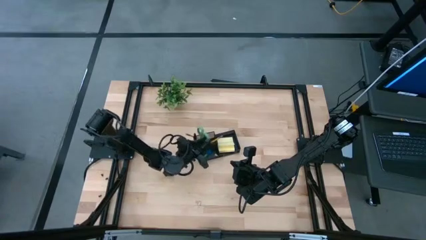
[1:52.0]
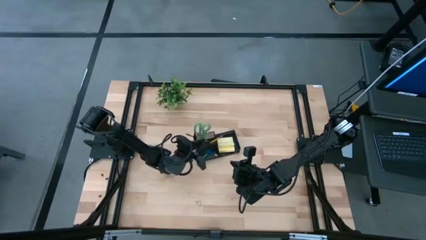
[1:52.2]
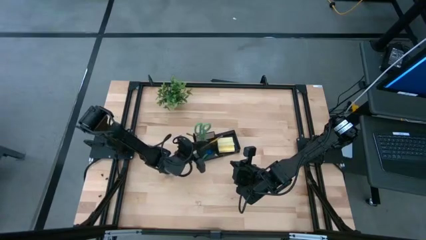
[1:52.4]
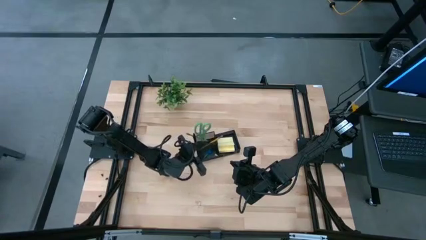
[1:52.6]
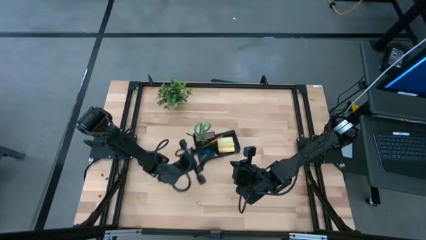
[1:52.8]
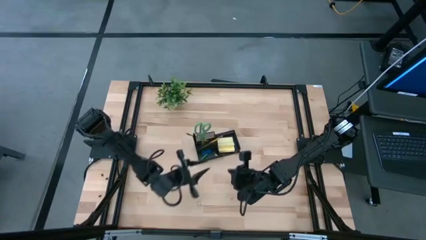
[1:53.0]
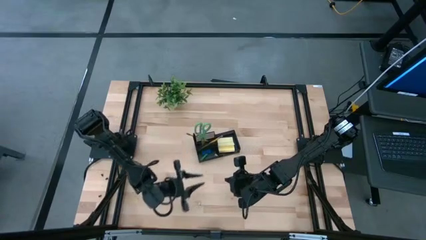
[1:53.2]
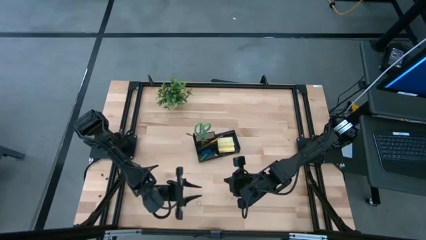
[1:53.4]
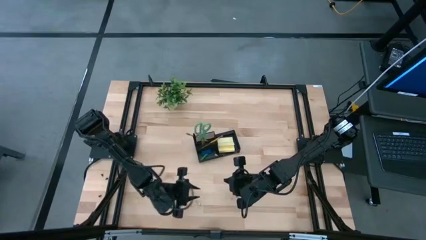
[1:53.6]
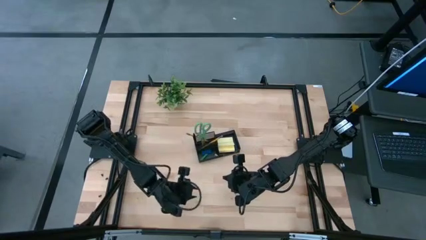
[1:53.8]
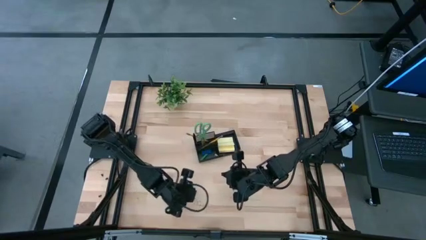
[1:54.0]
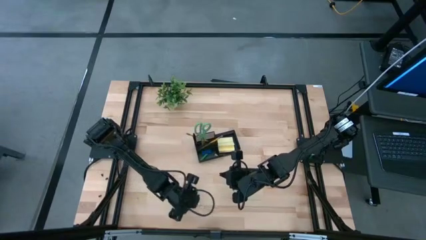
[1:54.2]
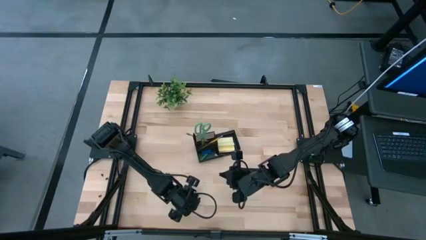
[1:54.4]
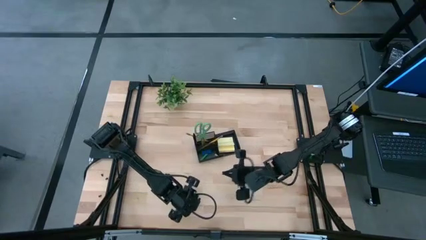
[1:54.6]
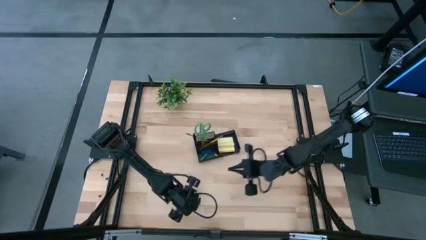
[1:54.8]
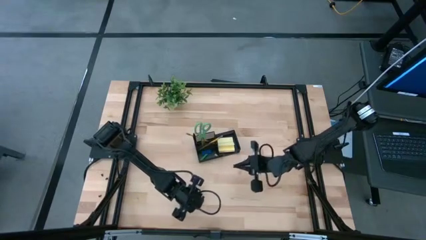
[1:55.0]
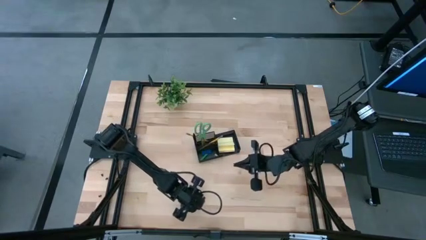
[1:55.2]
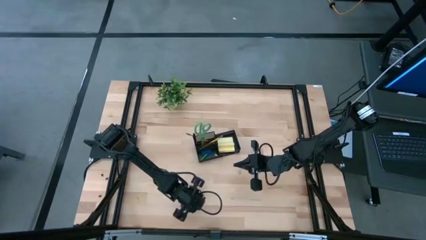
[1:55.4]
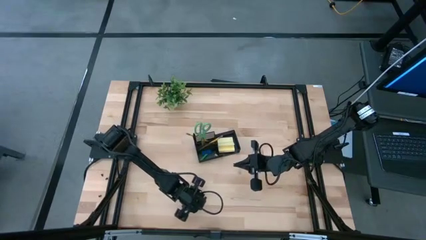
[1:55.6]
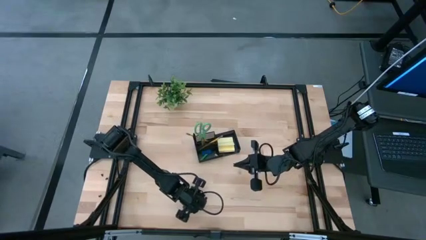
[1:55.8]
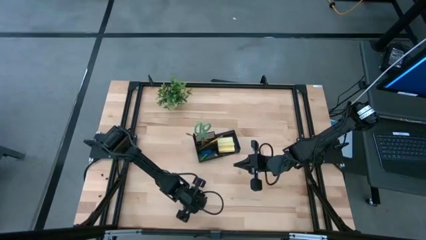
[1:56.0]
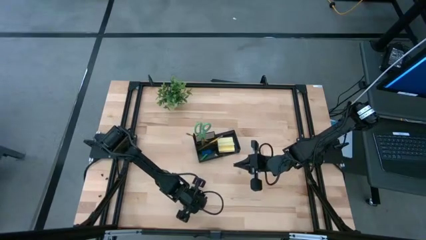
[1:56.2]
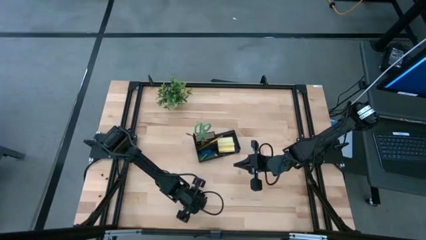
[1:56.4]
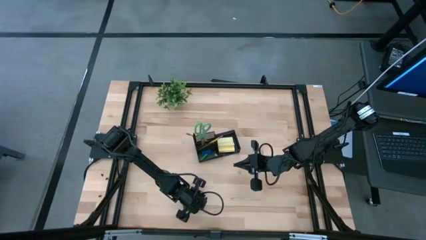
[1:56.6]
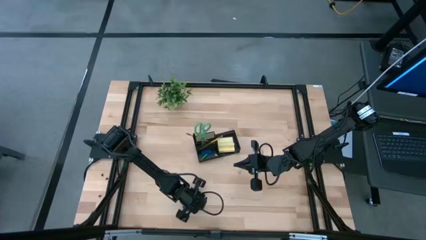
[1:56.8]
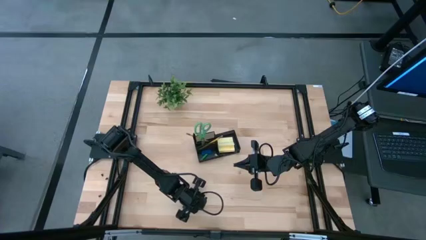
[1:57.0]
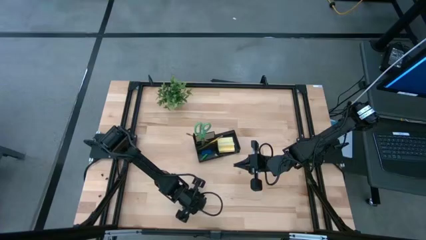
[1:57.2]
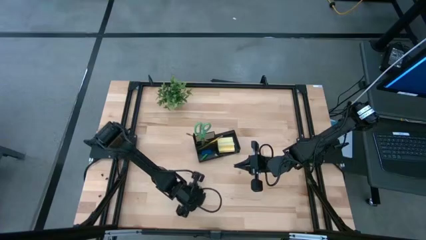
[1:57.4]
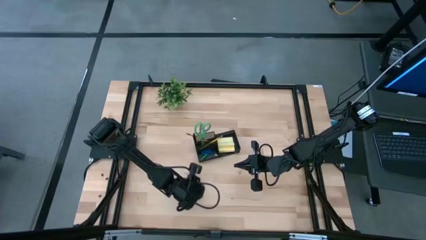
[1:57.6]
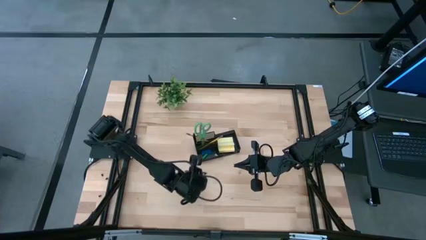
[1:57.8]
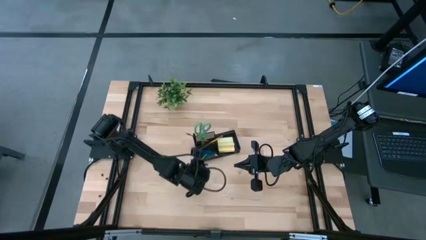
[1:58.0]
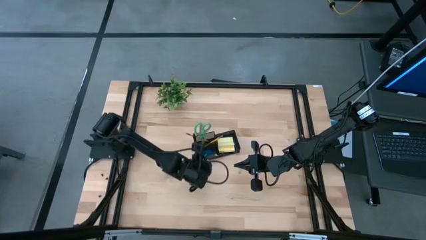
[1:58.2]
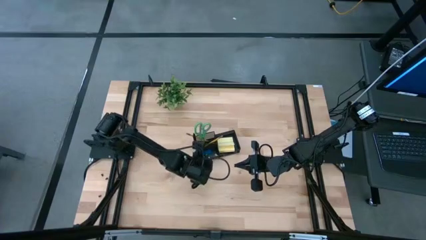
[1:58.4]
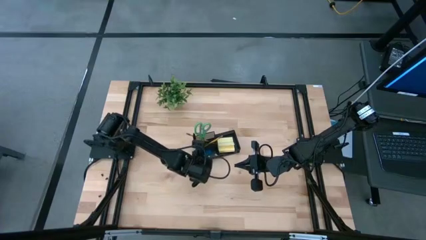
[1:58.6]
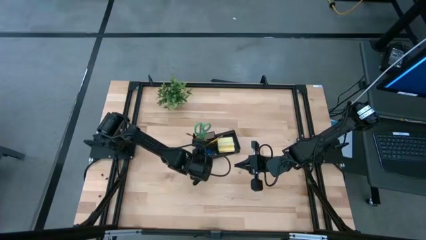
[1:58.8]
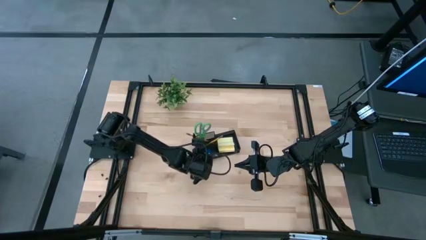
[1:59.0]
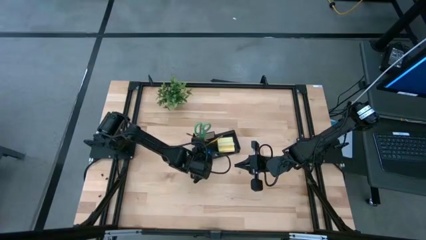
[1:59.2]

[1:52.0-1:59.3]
Task: Pick and place office supplies into organizer
Put the top yellow binder clip into the black desk organizer

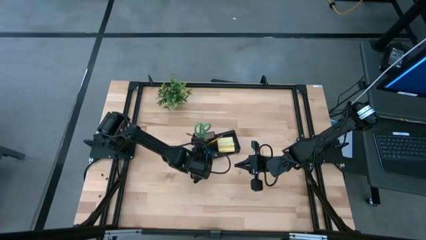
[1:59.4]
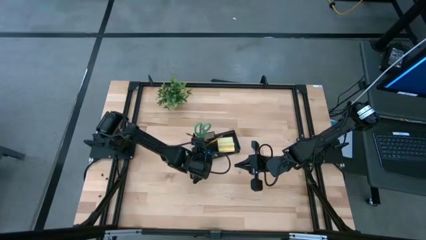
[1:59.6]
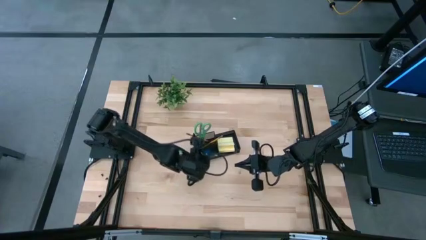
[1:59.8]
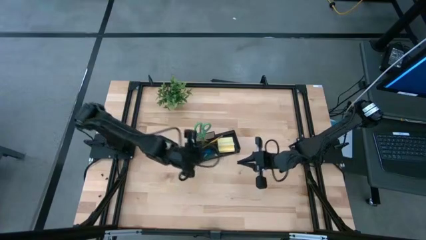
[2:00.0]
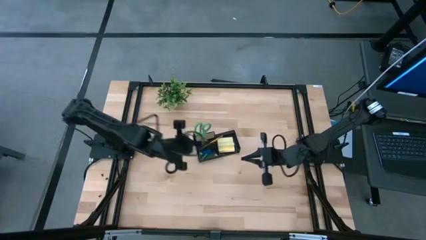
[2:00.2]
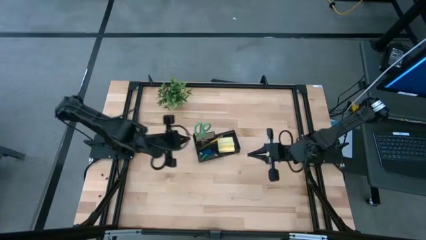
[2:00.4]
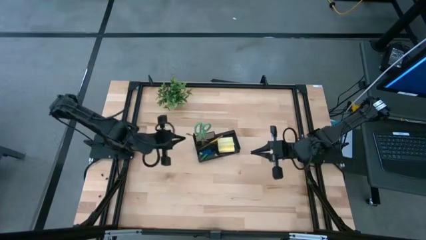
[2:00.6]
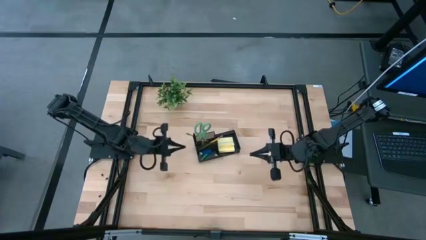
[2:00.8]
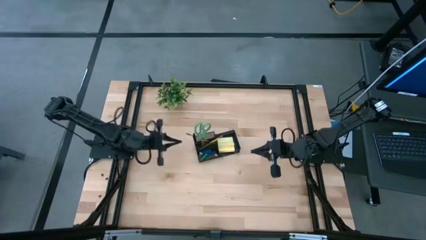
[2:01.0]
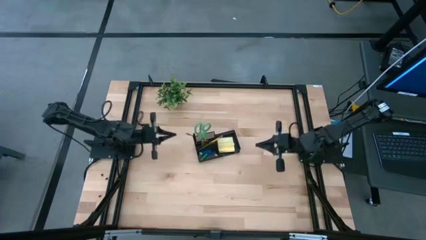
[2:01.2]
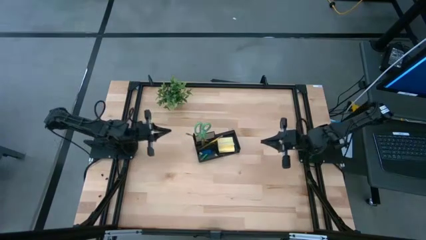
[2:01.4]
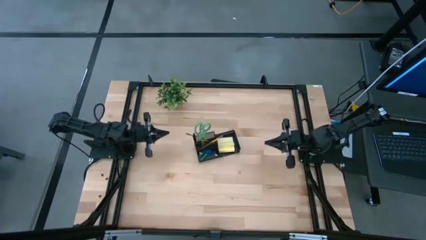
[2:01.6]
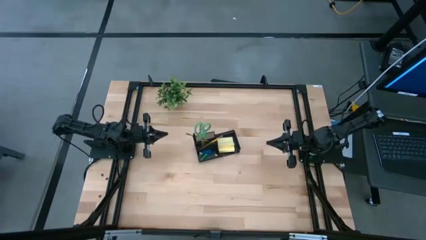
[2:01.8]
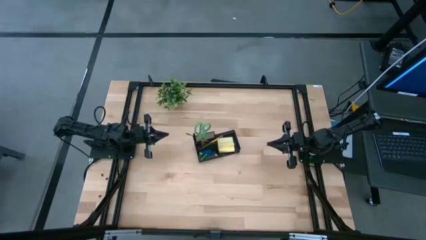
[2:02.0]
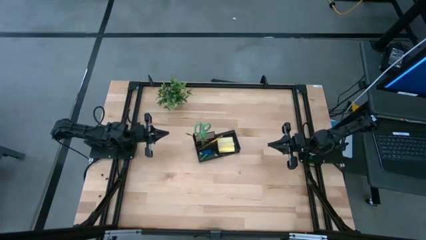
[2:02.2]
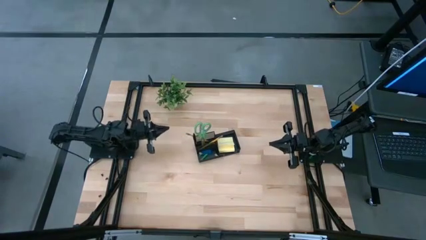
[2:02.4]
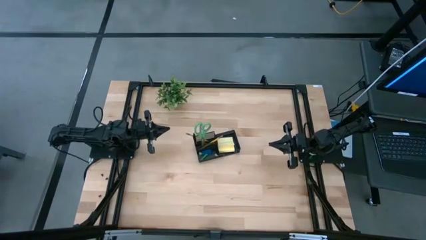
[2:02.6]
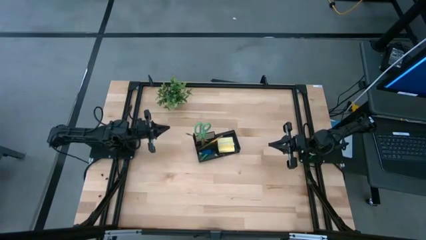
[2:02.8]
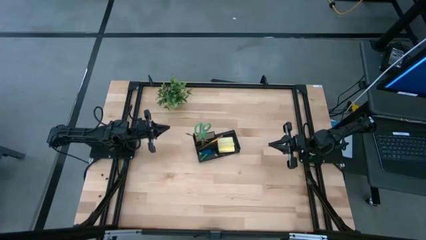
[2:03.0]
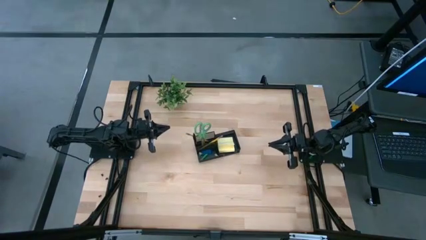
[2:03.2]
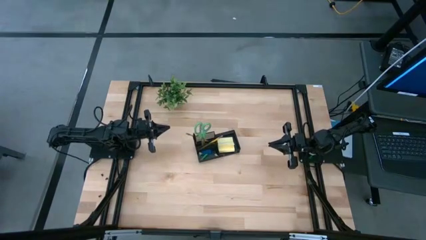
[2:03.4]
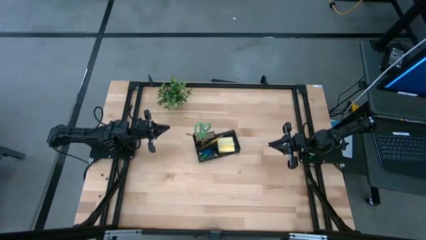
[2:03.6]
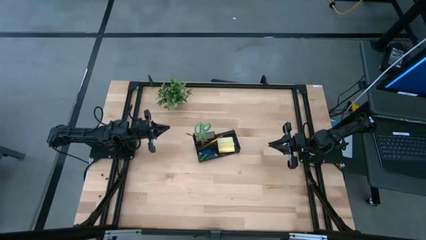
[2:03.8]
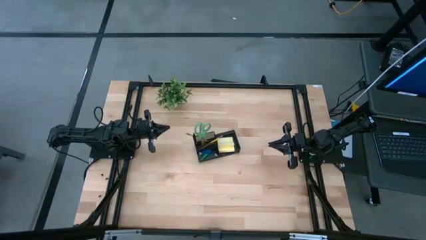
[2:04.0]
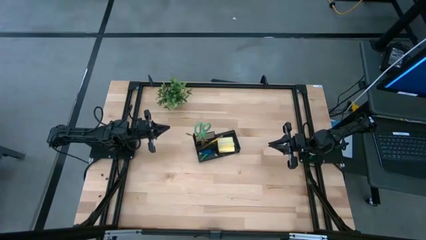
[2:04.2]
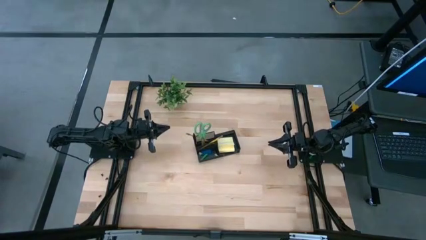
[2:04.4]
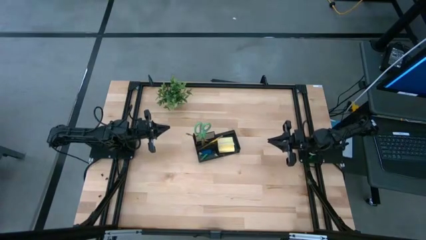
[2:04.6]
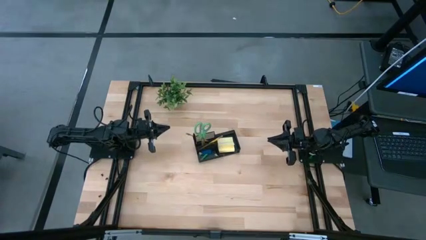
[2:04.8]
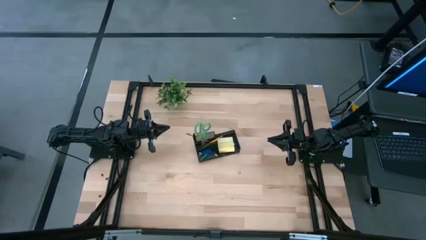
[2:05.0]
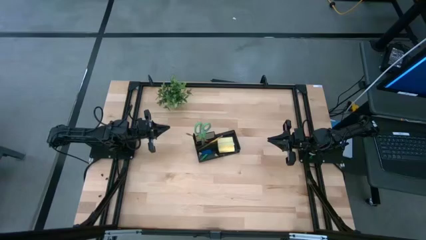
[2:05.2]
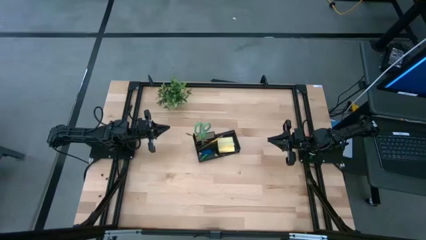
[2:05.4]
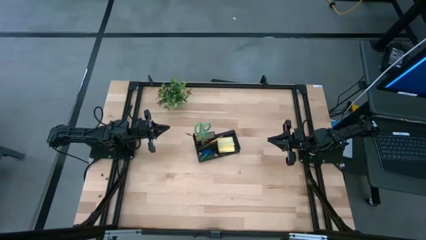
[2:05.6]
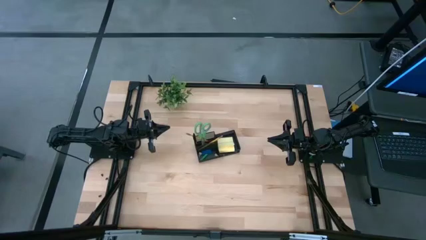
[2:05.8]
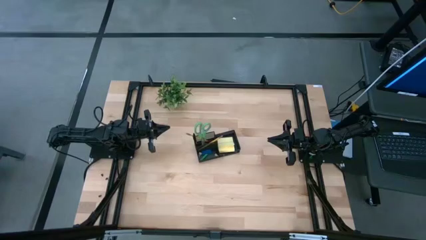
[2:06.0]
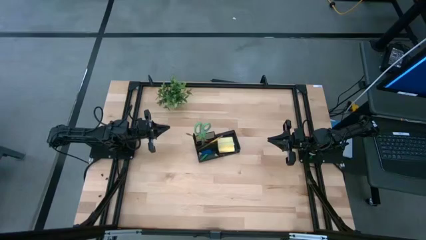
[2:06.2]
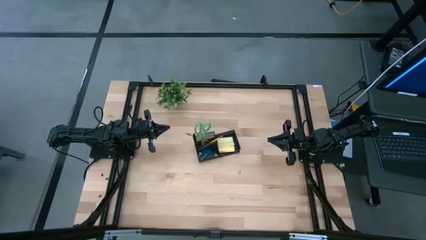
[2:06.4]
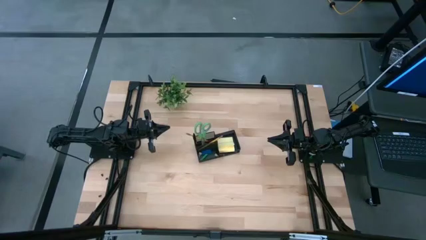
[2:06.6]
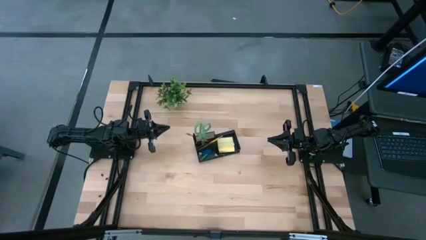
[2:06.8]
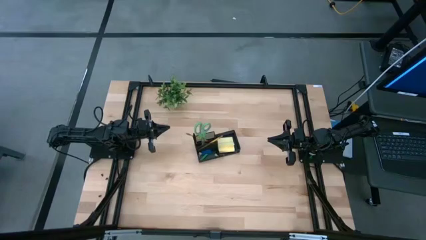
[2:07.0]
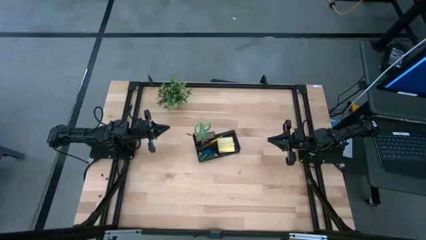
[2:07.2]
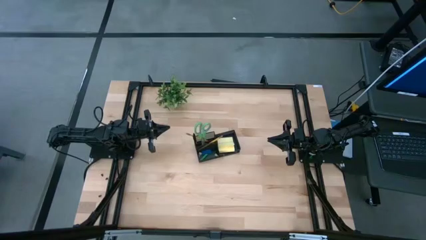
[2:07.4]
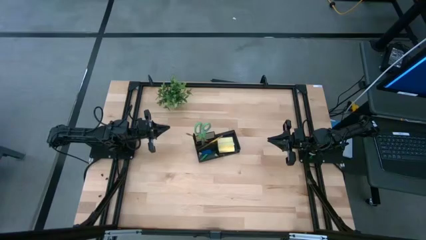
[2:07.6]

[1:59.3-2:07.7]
Return to Home Position

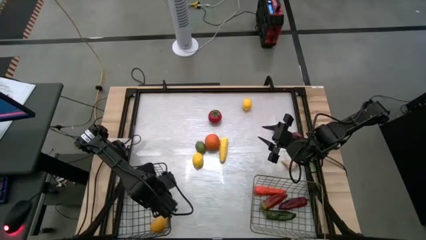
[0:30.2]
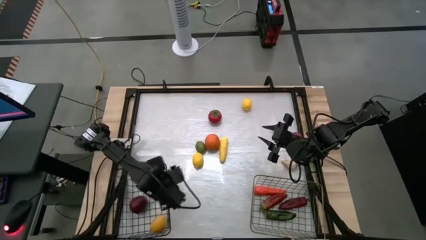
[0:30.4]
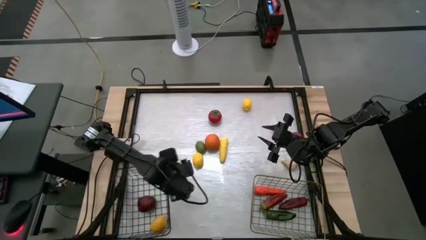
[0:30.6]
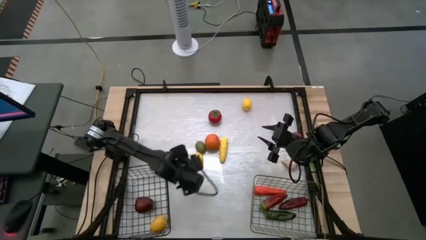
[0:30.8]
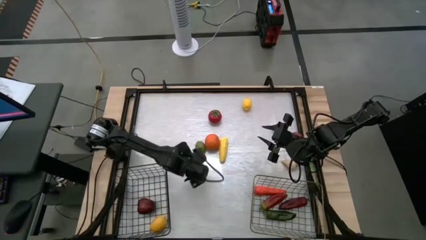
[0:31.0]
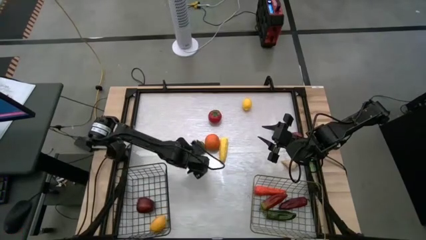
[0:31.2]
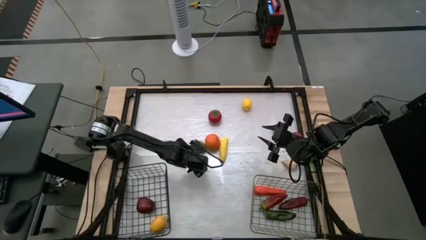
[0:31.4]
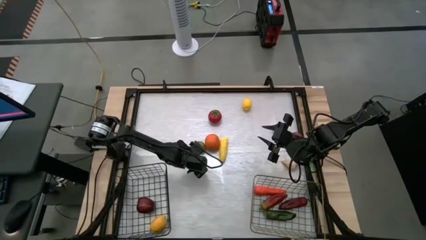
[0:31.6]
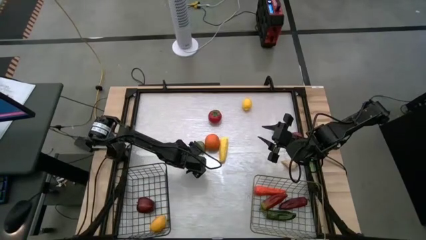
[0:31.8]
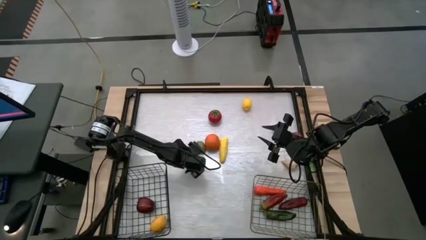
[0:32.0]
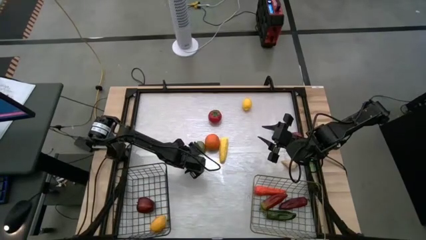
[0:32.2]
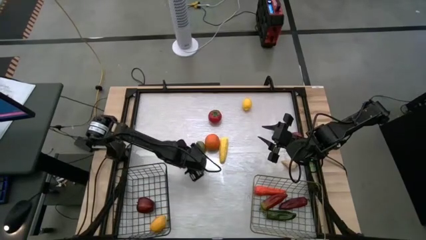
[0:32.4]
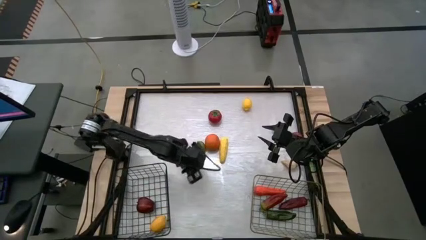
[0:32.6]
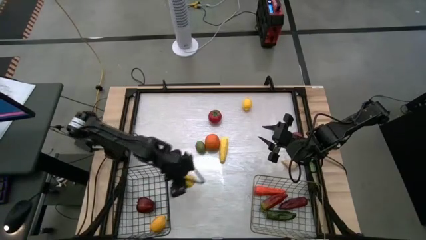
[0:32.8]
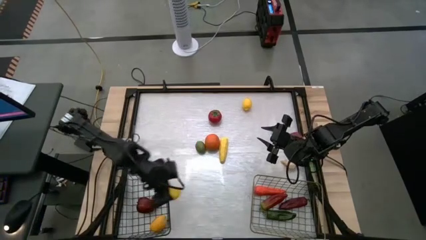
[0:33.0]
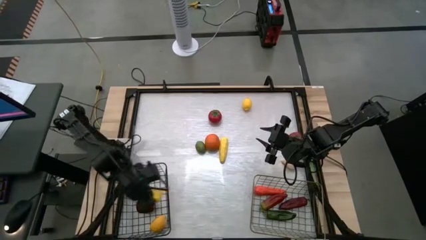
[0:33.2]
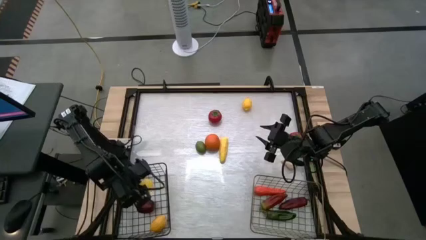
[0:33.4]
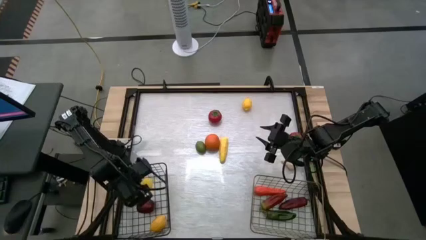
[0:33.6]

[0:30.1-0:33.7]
Task: Sort produce into baskets
Put the bottom lemon into the black wire basket
